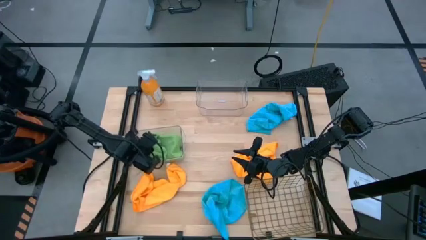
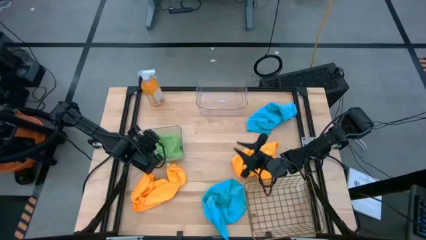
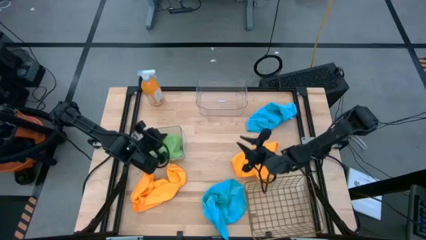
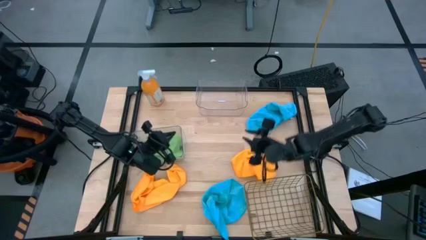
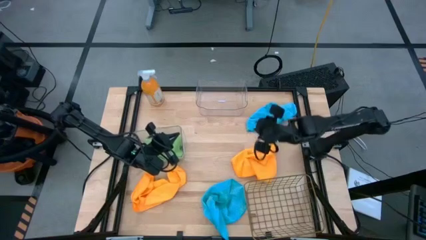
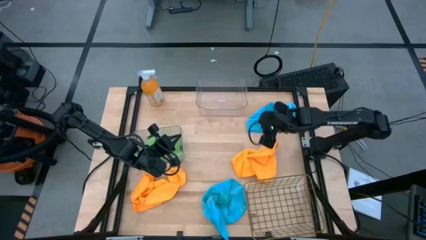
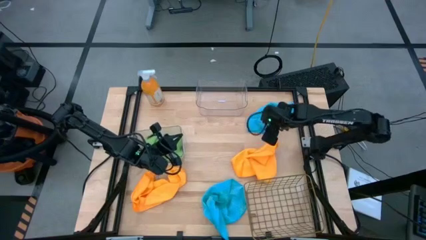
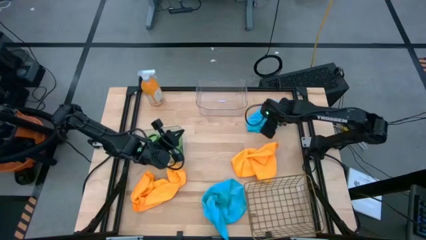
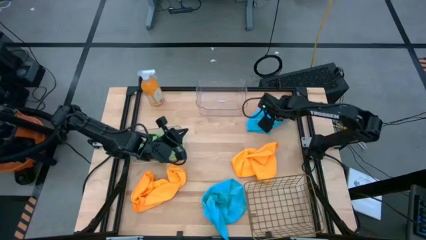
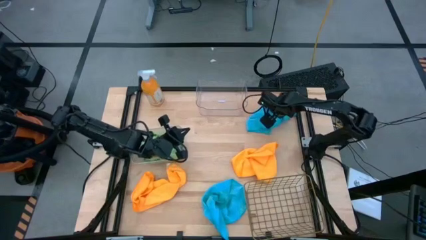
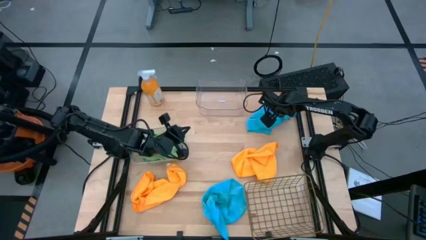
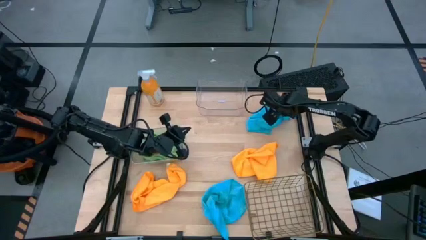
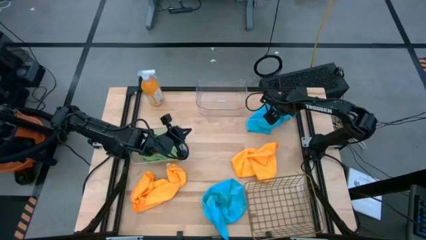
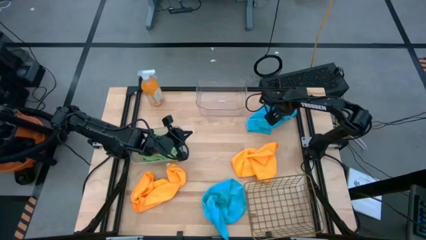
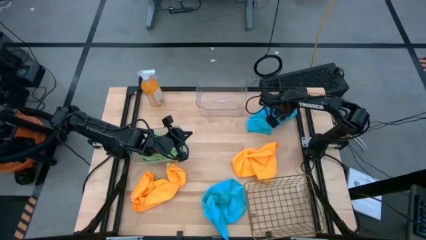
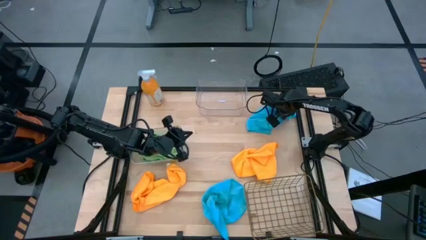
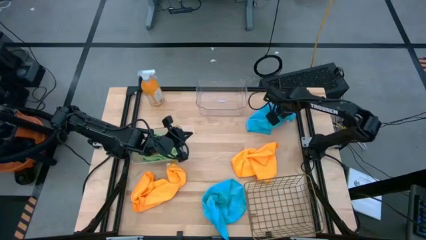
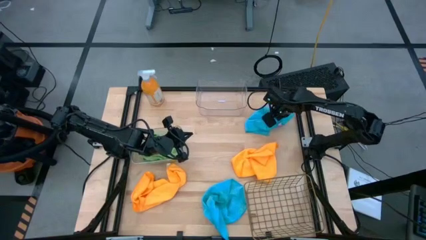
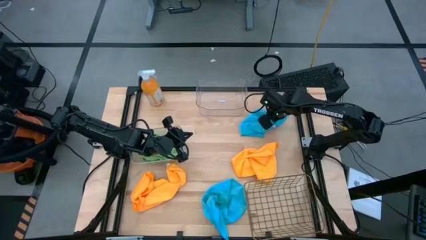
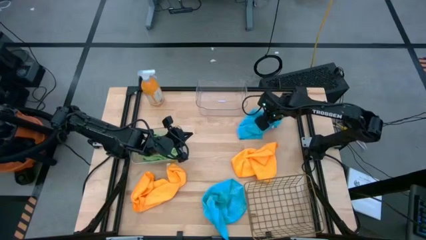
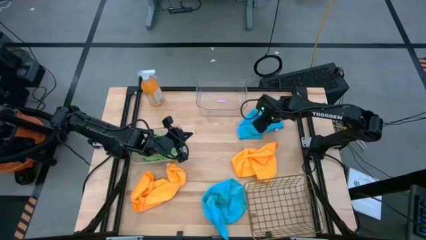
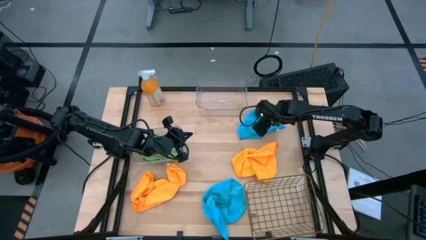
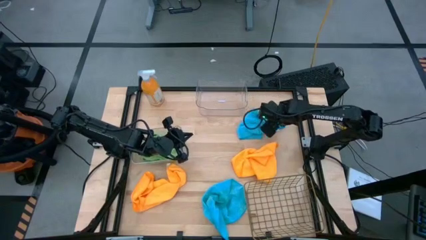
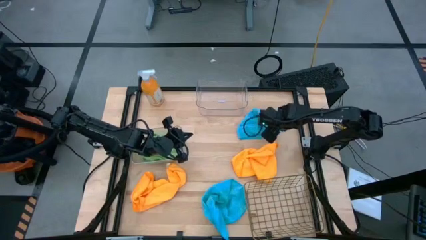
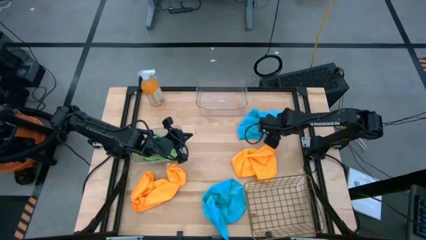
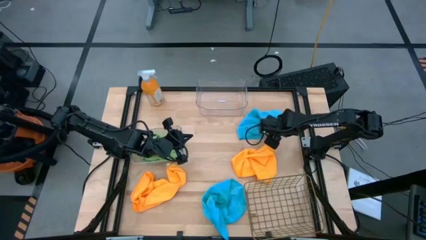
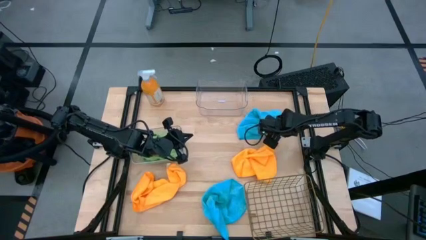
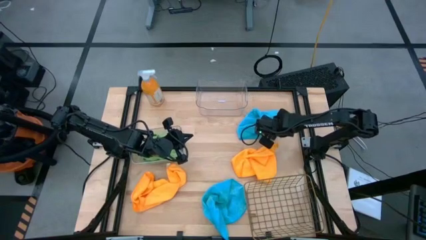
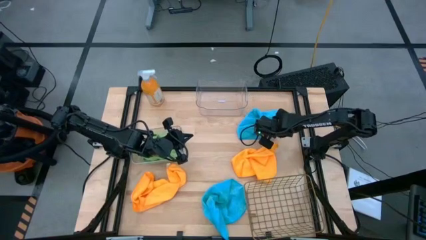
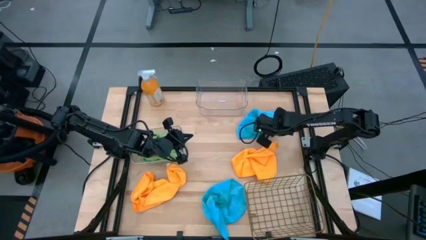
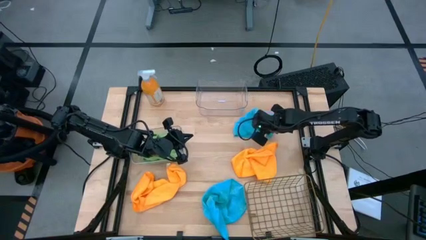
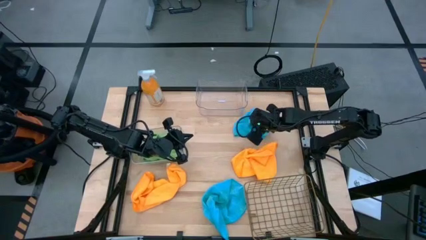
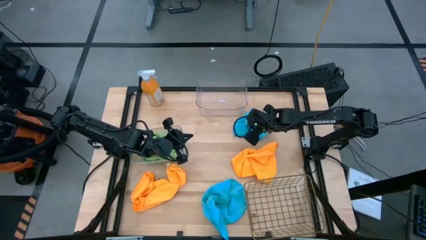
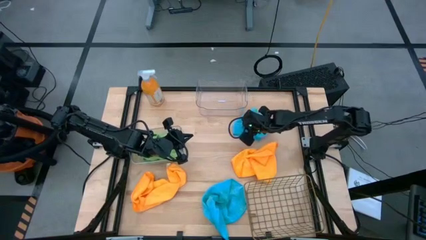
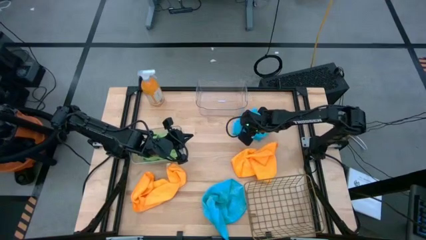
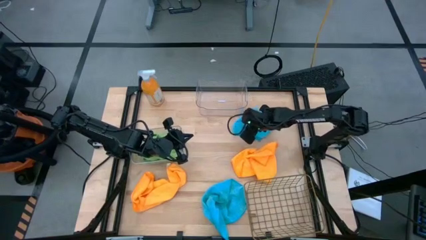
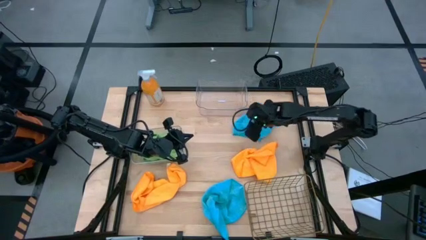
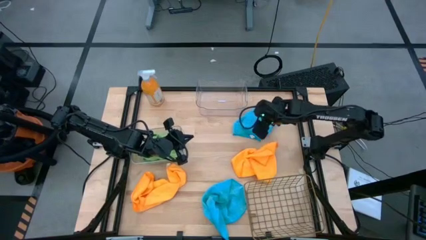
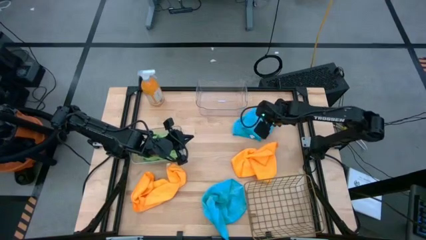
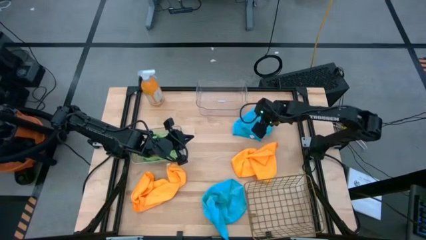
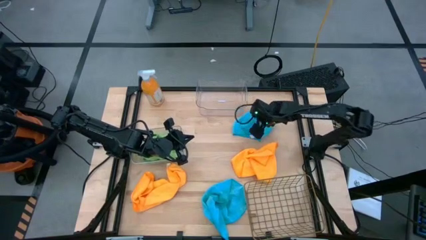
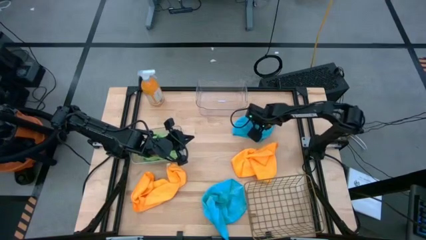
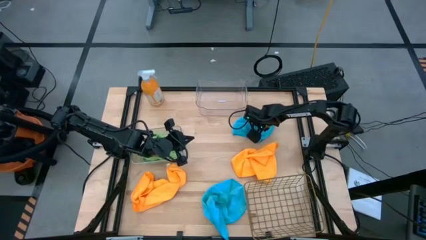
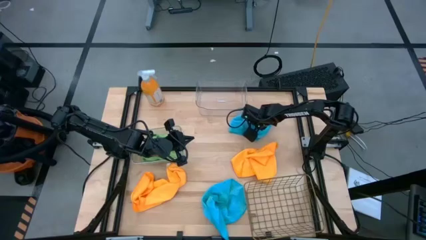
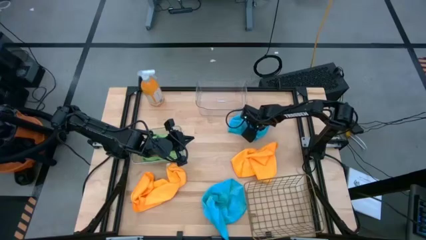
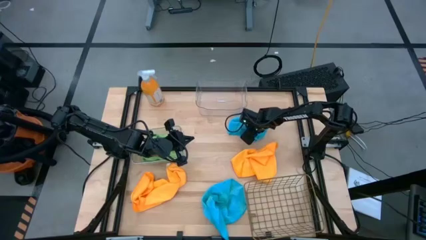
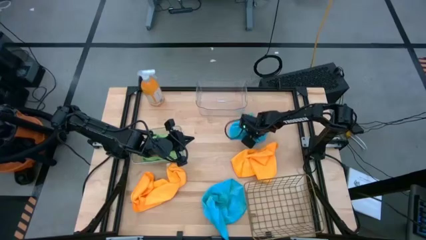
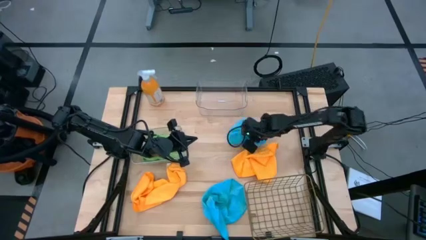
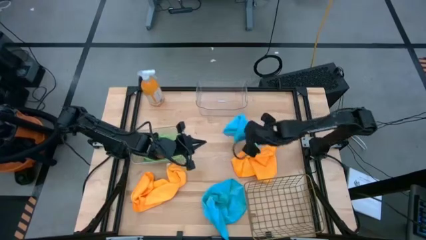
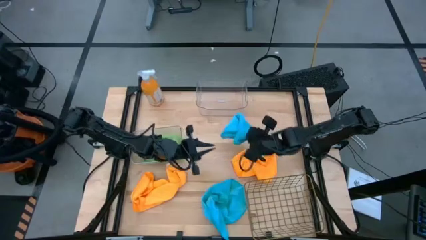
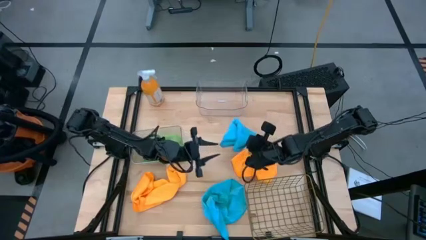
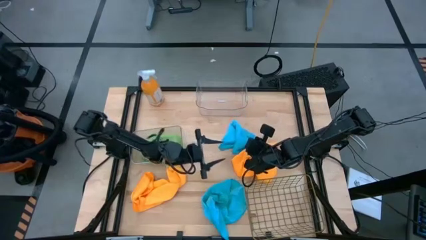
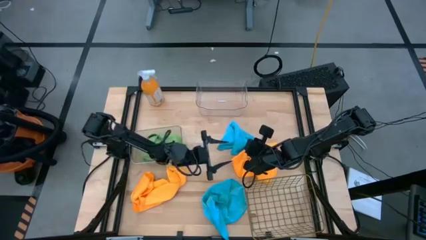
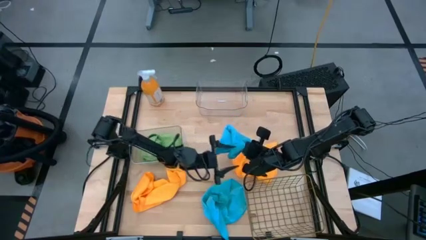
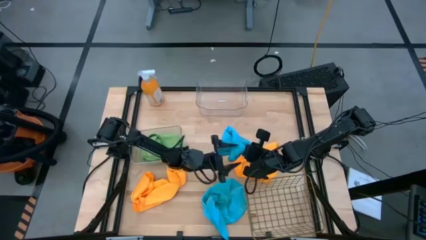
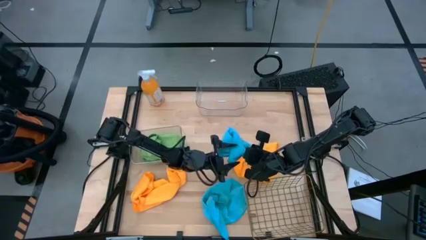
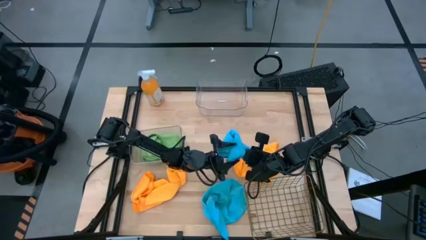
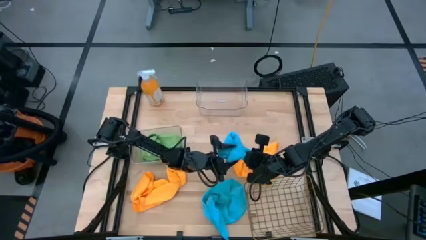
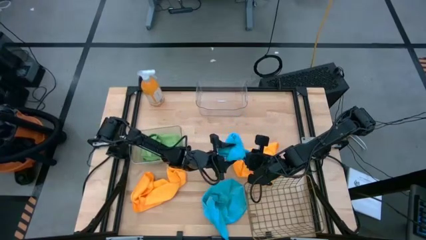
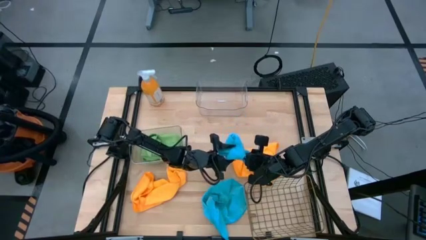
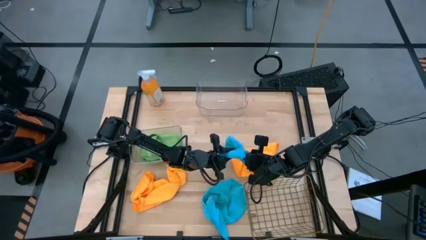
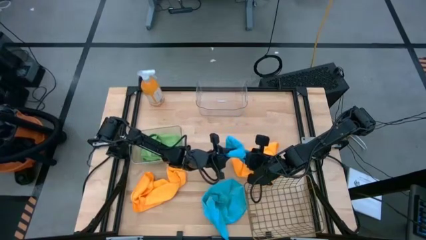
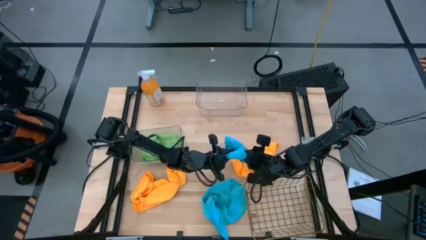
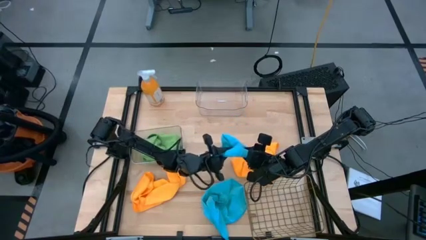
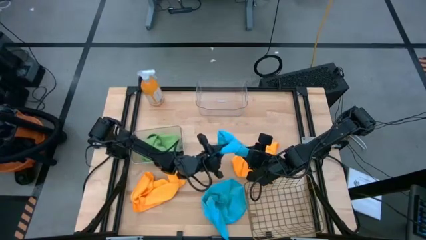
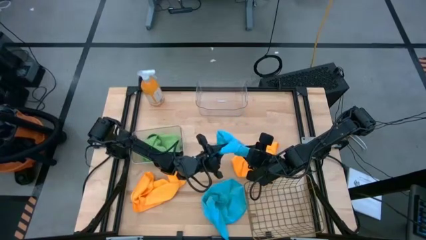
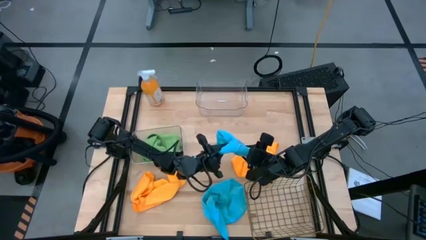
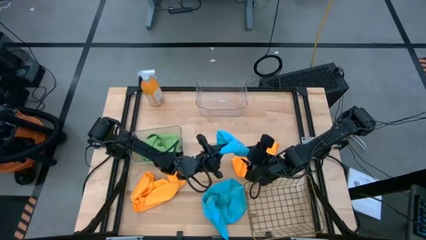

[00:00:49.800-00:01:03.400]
Task: Sort microfiber towel by color & place in baskets
Put the top blue microfiber towel into the wire basket

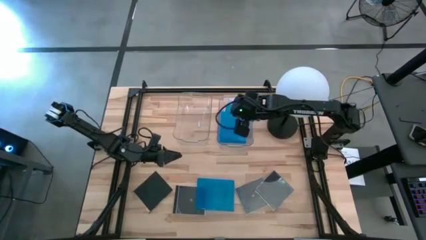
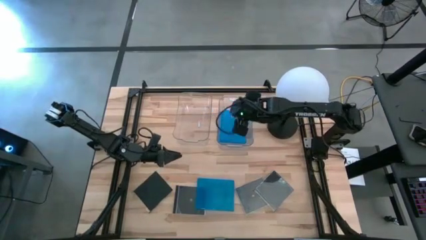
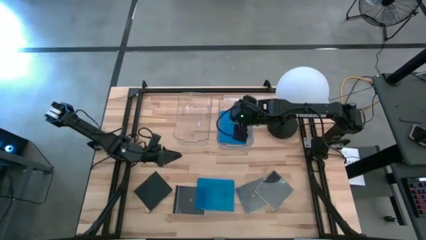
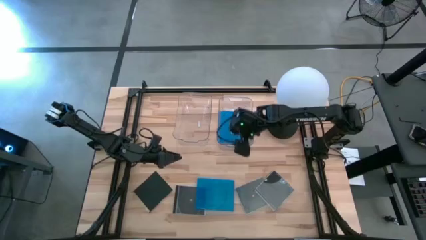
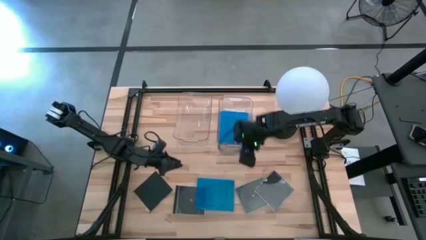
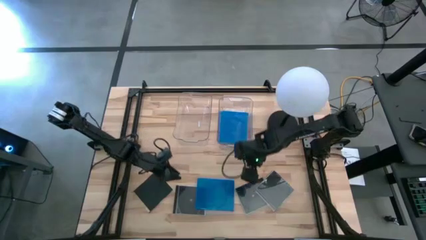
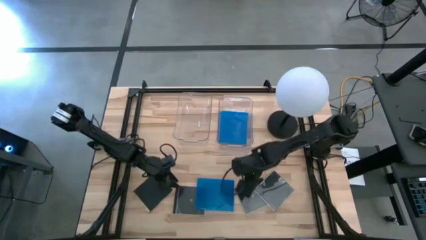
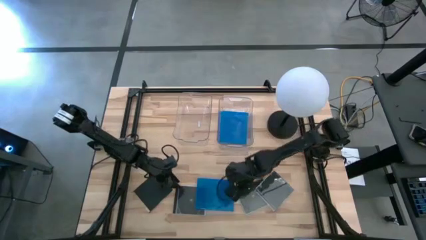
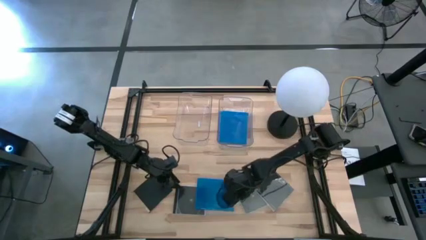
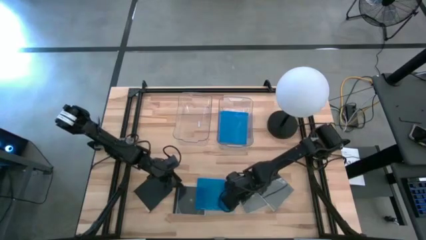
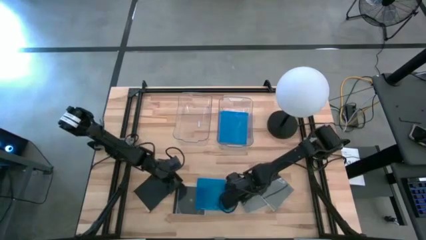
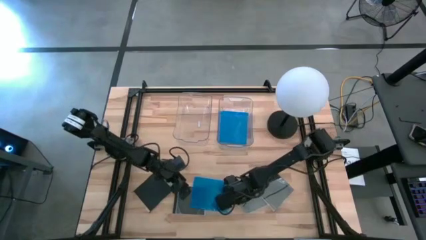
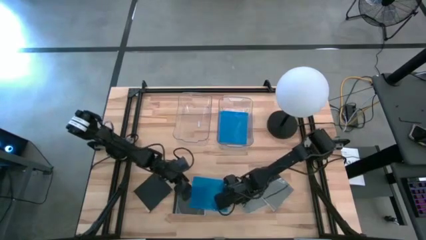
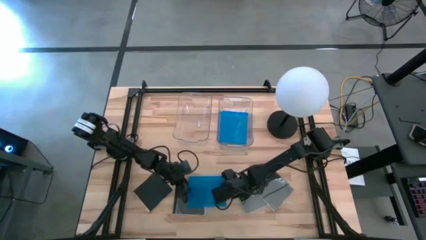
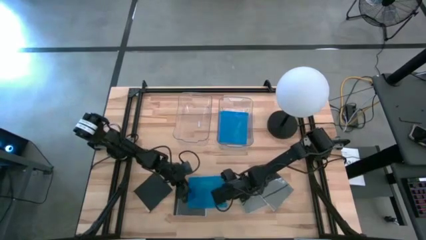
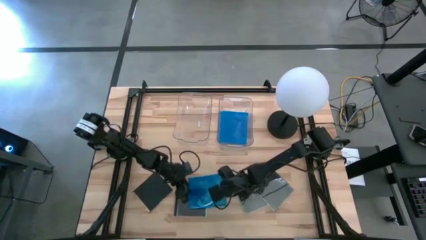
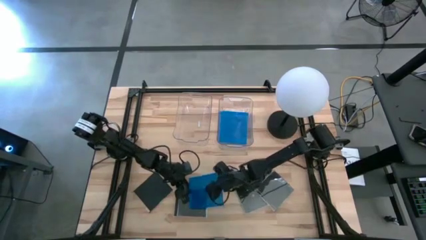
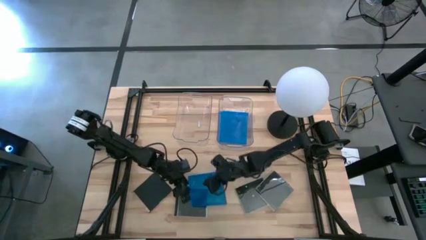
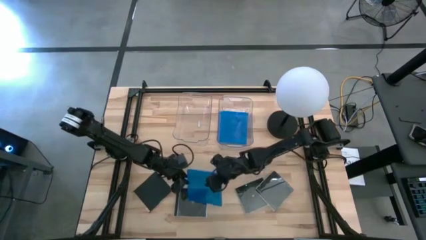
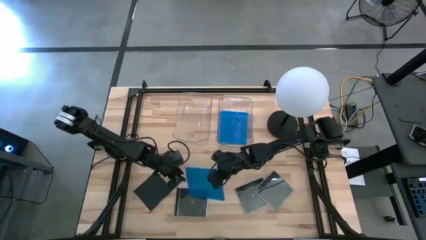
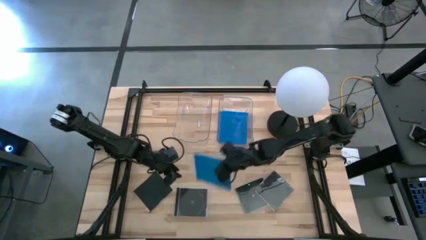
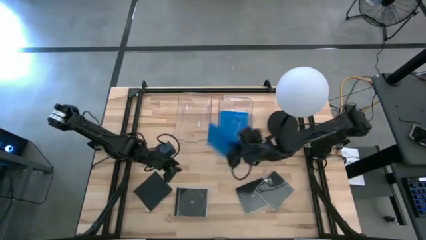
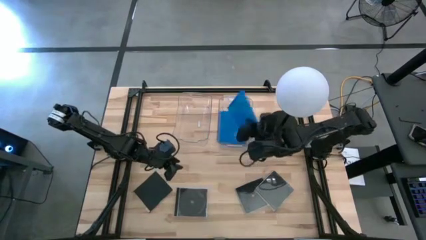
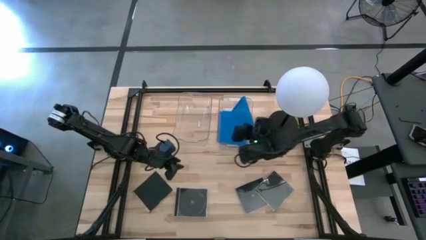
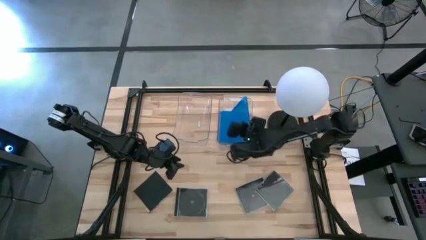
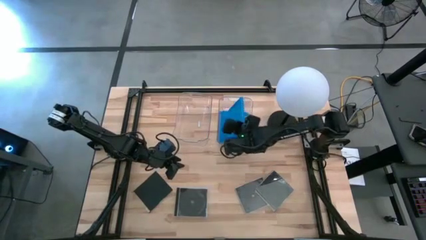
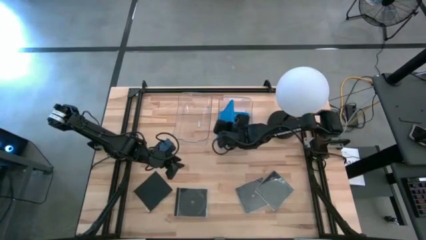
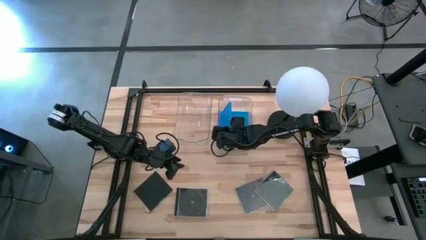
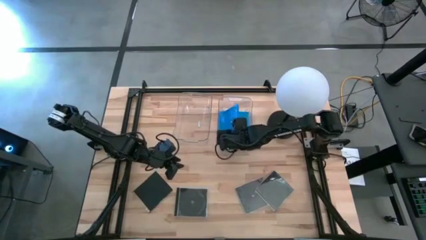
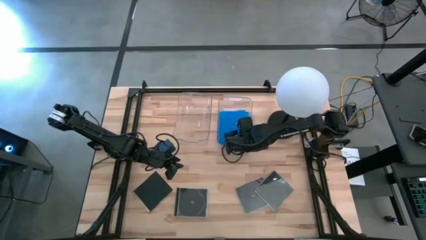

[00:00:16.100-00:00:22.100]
Task: Pick & place jewel cases by type
Put the blue cd case into the right transparent bin
